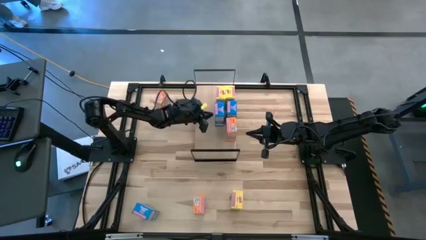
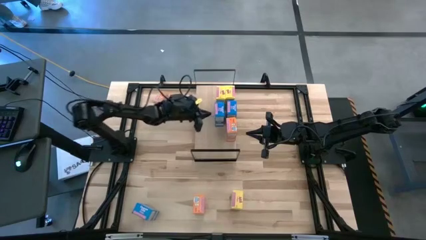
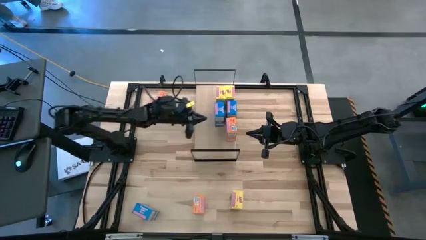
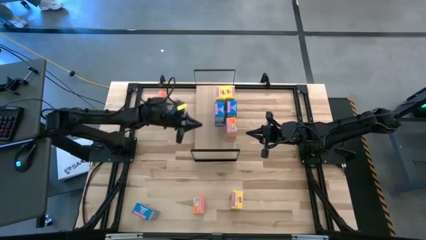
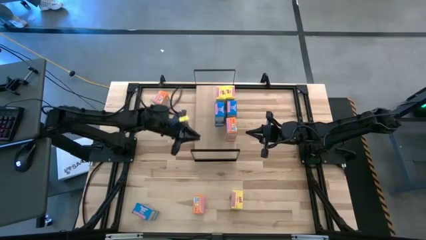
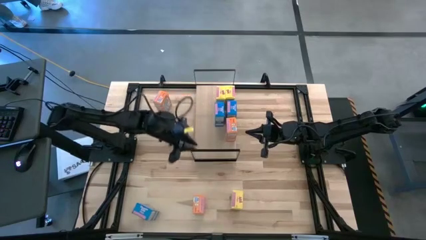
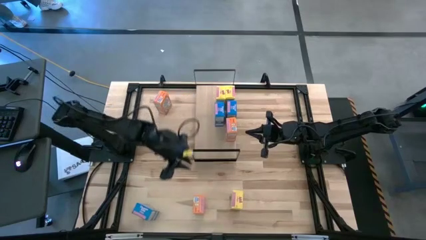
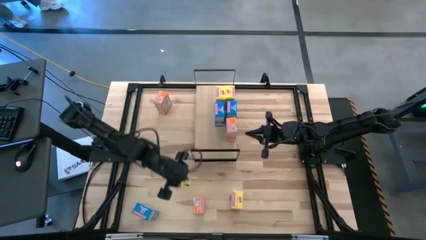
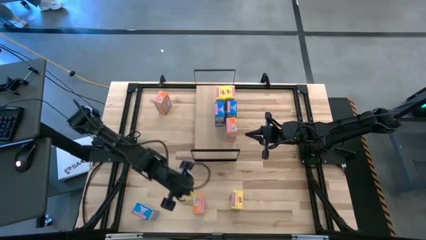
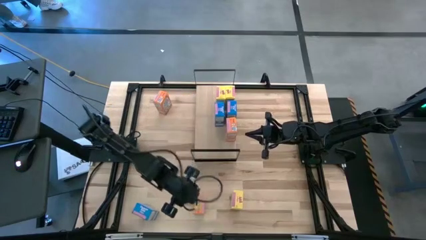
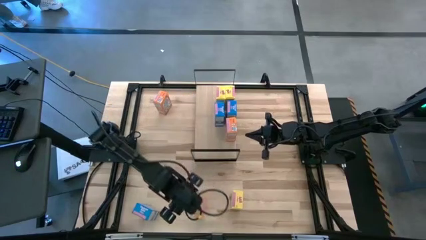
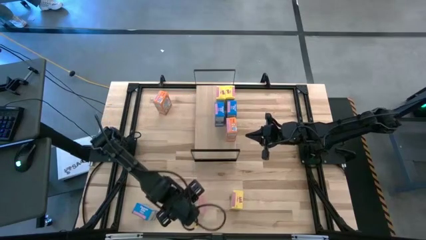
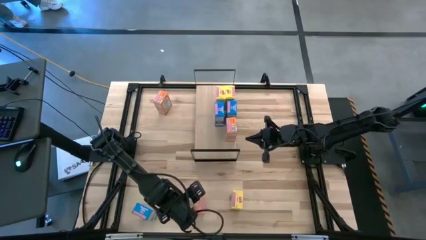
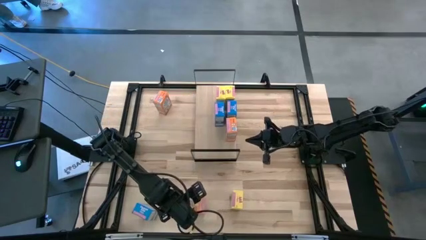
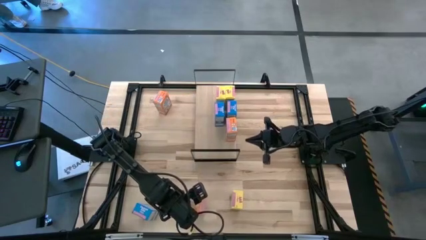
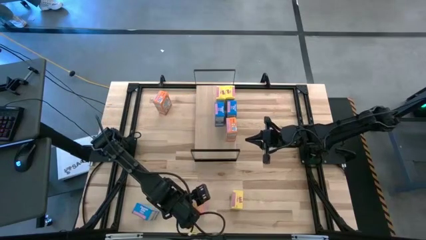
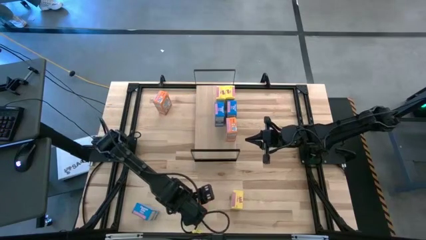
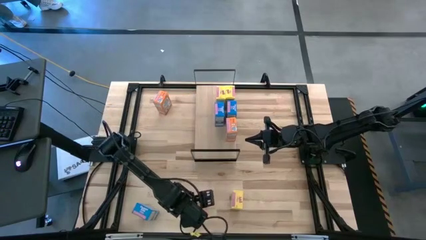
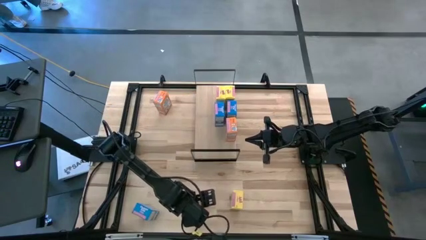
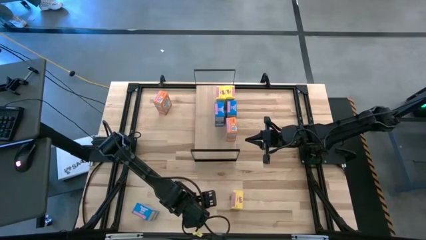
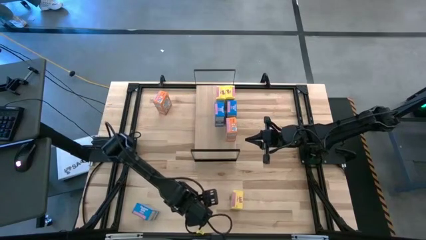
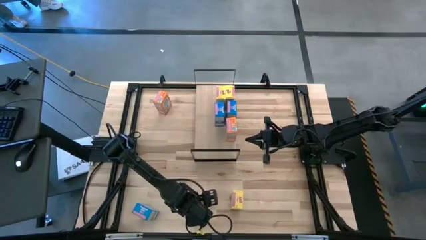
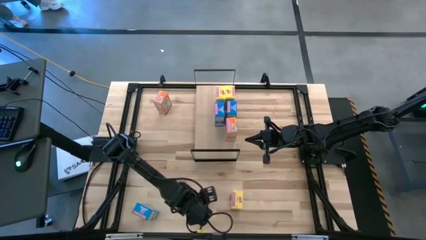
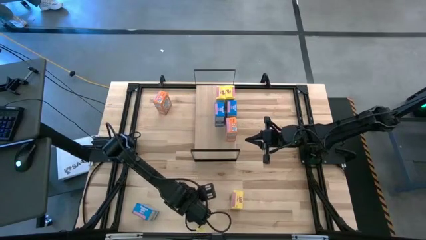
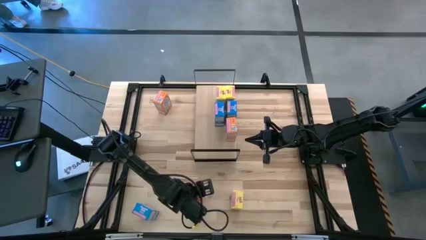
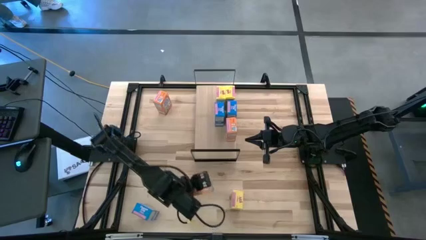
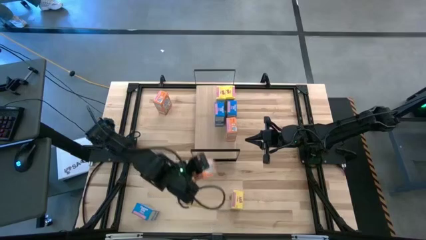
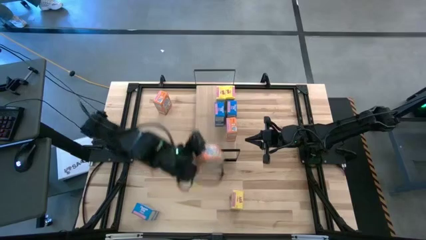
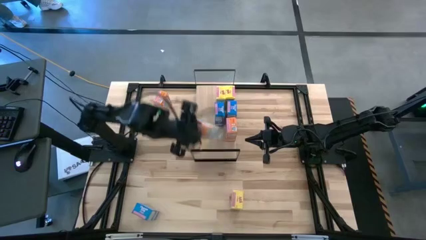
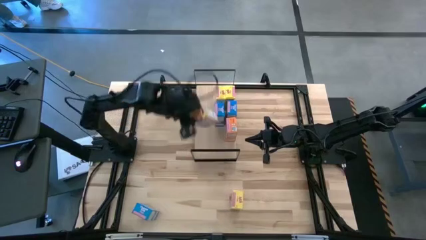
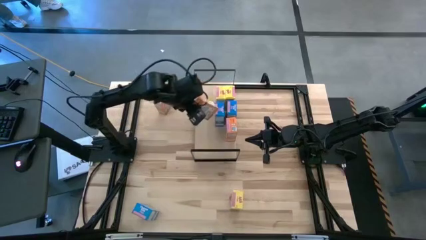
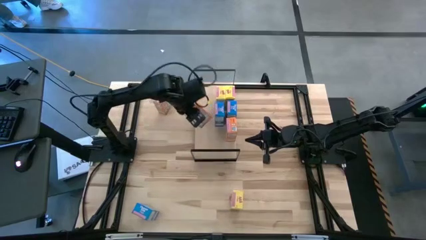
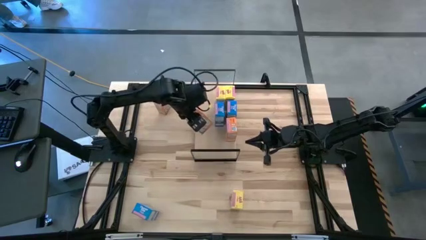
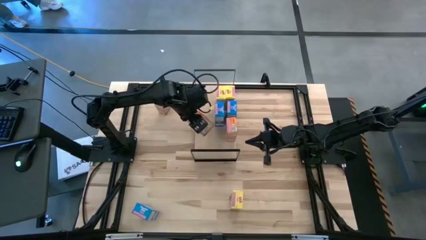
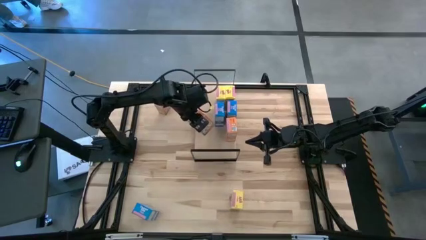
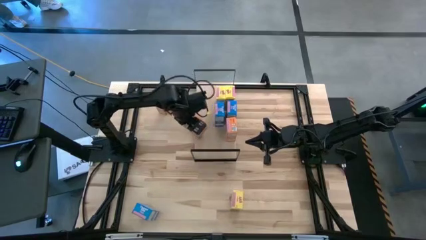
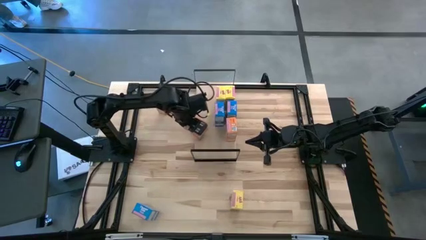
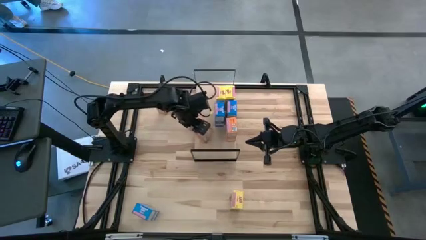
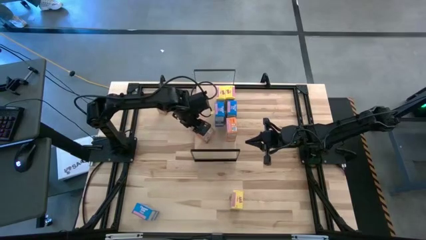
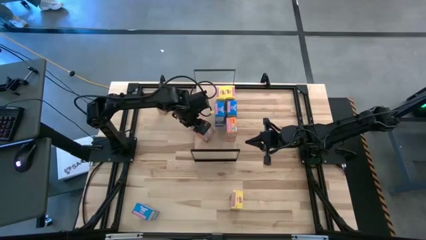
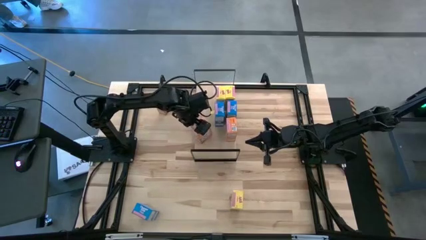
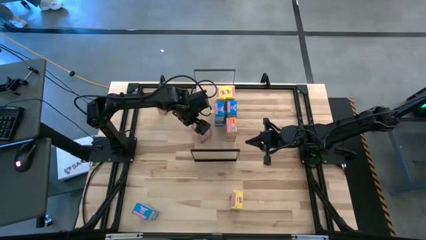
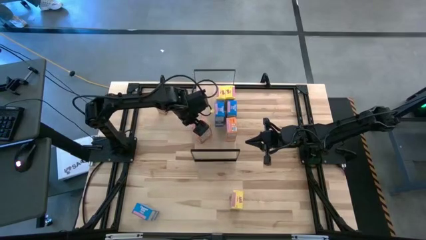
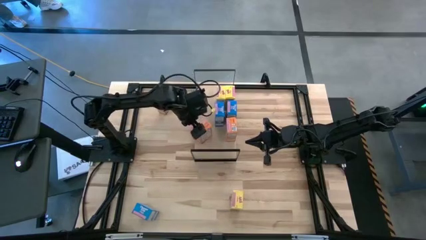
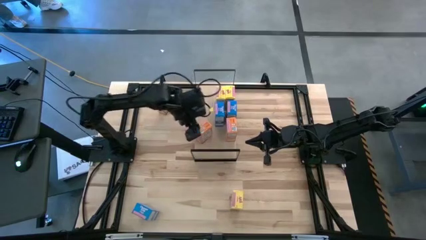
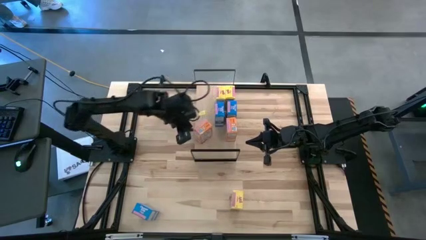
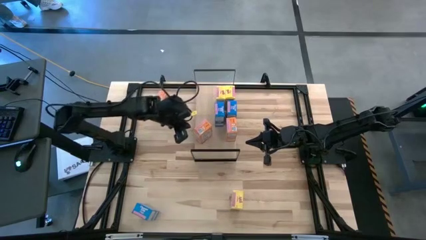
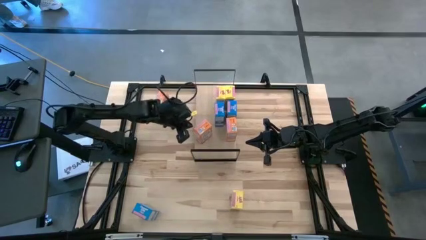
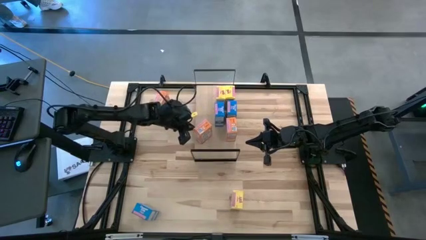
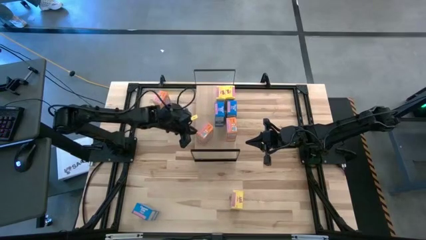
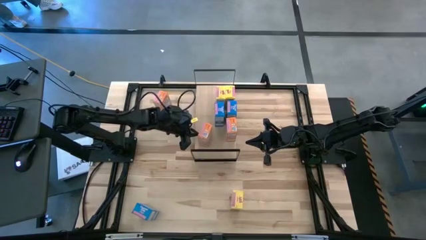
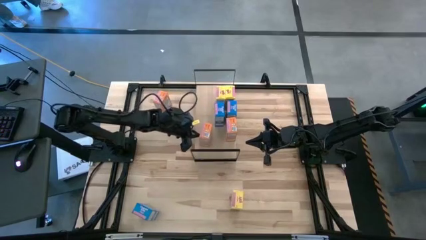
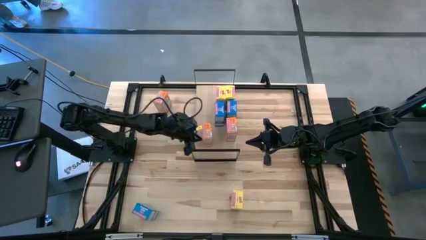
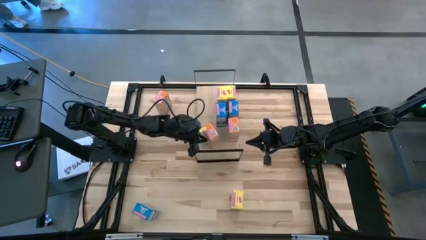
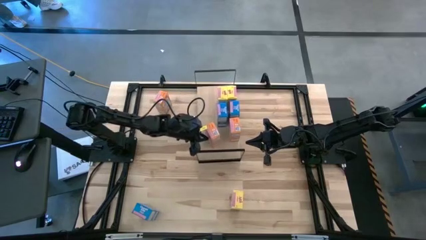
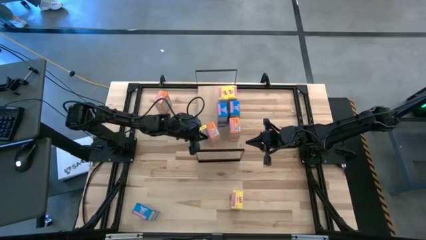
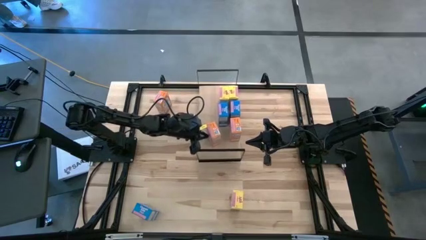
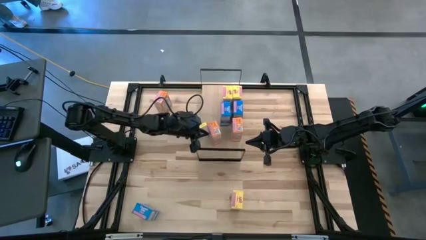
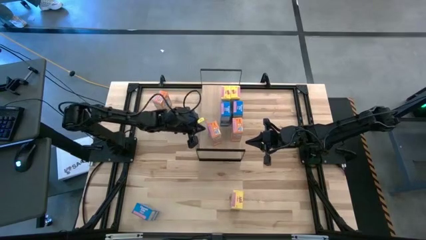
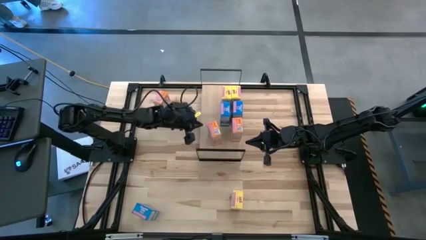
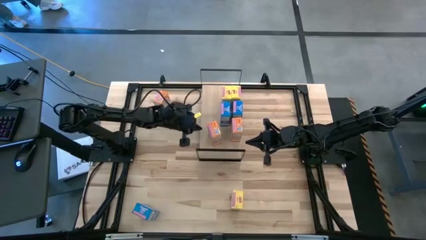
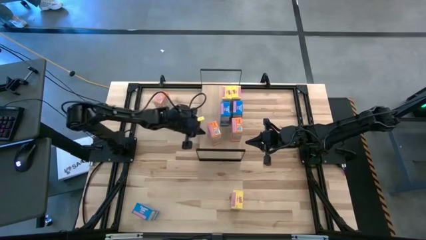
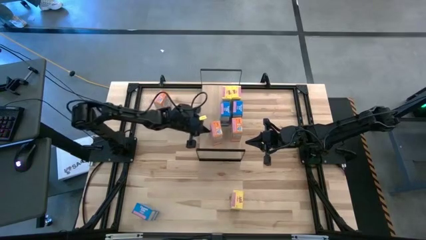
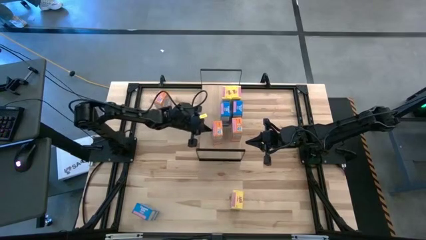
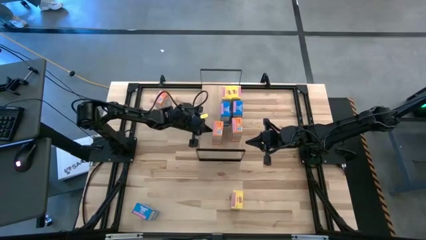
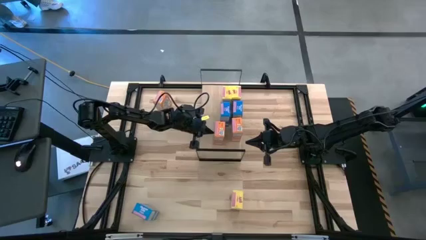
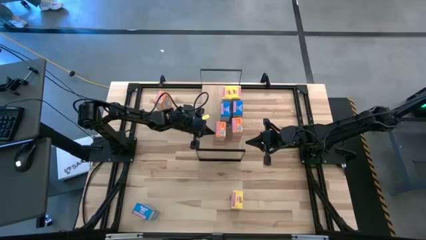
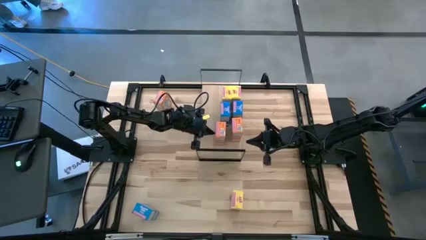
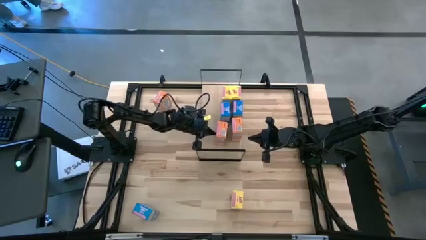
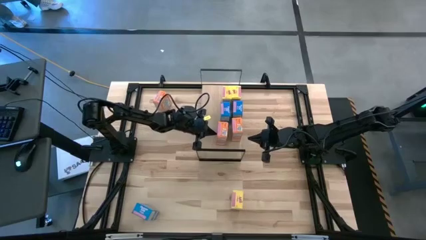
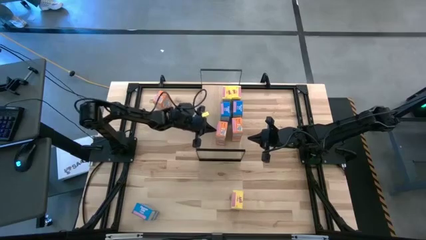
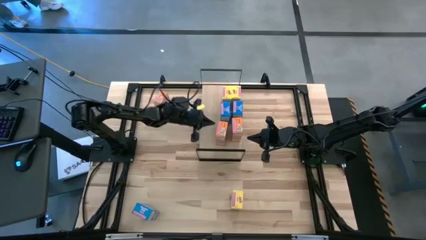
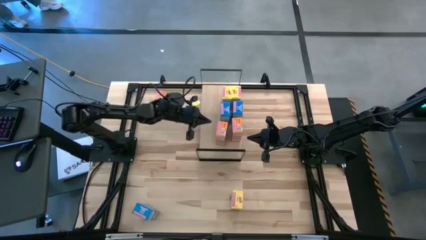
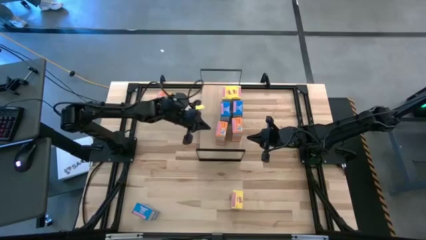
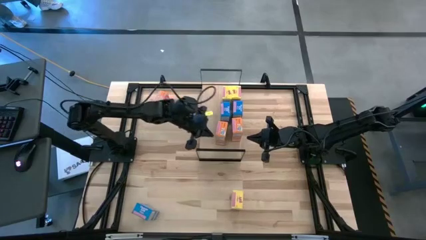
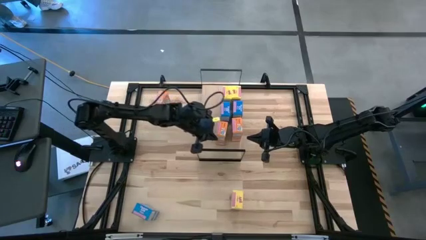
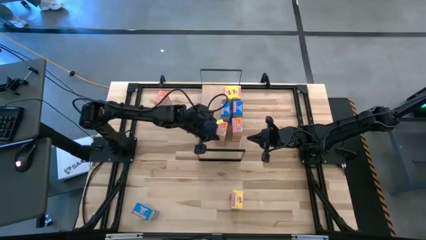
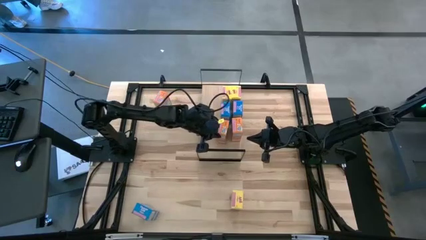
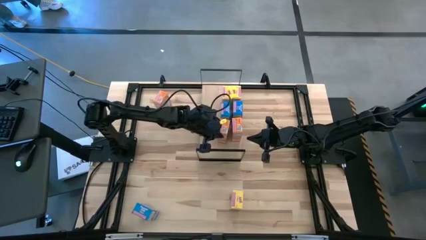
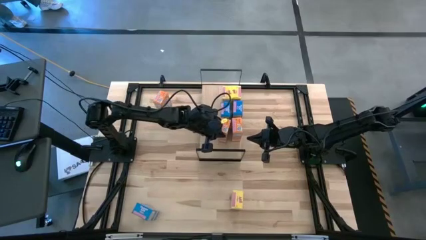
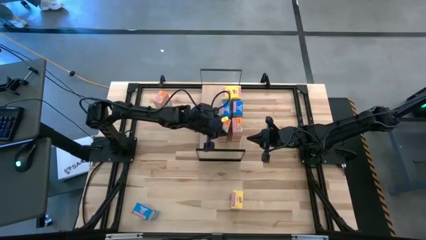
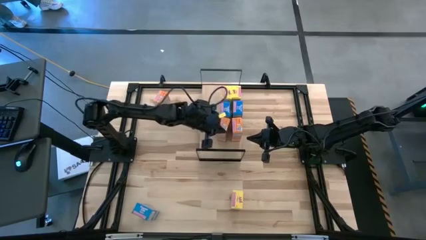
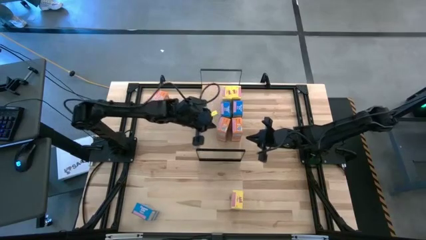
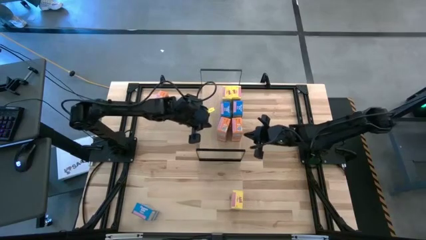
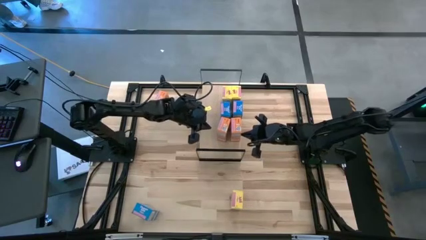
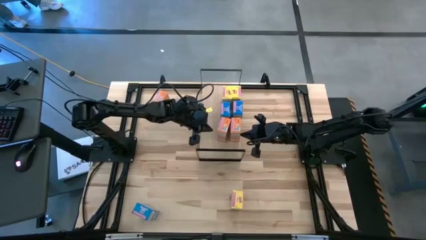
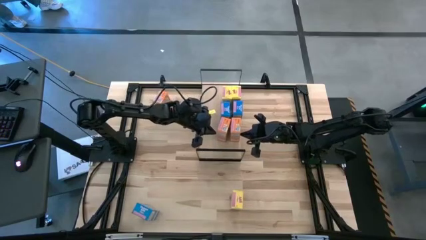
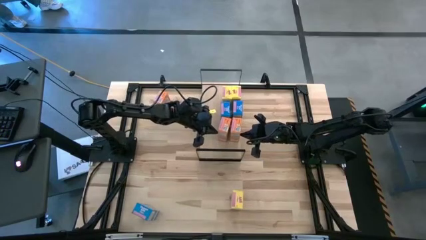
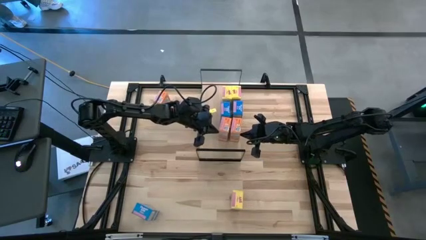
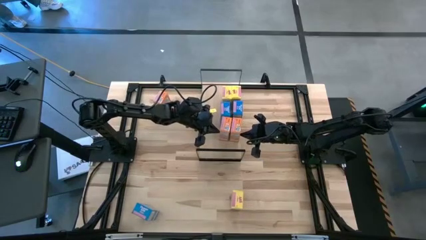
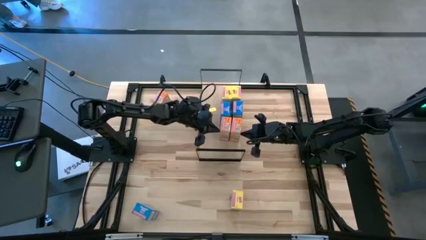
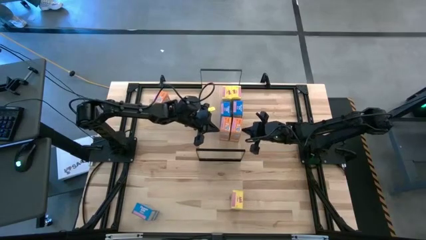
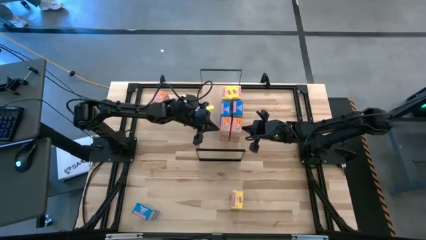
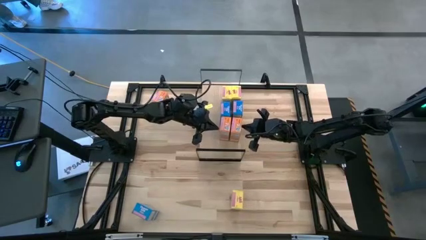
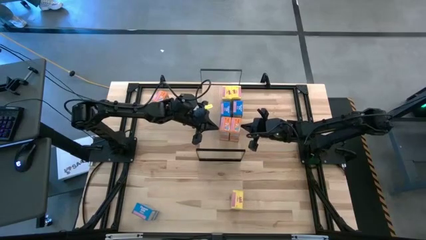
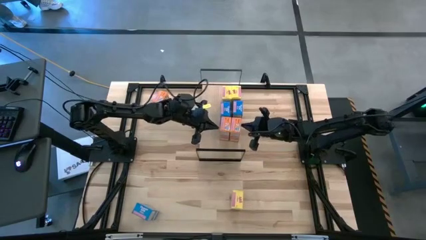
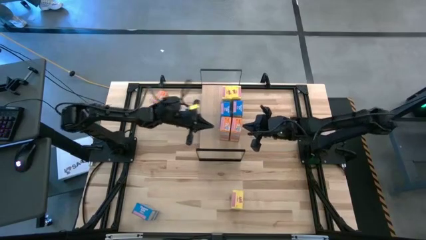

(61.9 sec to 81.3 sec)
Task: Stack cereal on shelf
Put the bottom orange cereal box on the shelf aligned with the other orange cereal box
